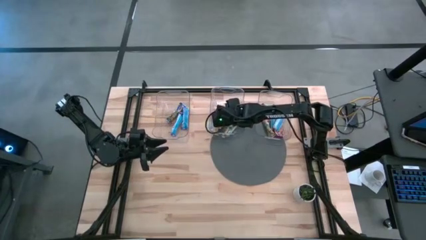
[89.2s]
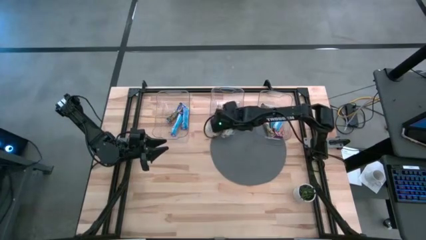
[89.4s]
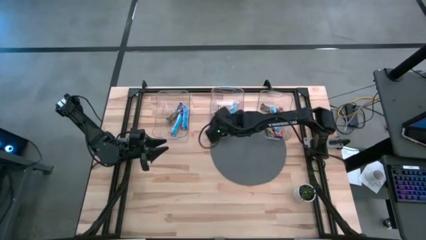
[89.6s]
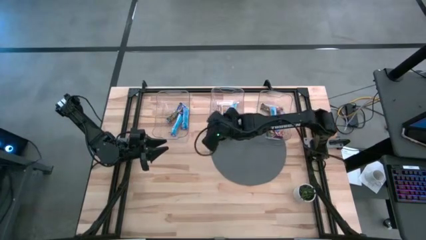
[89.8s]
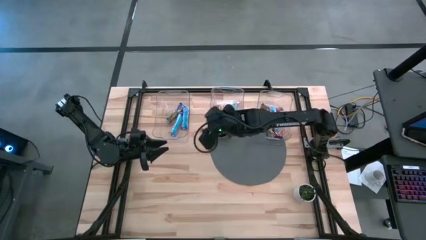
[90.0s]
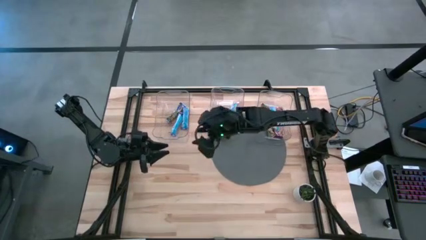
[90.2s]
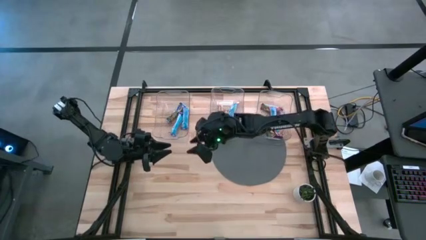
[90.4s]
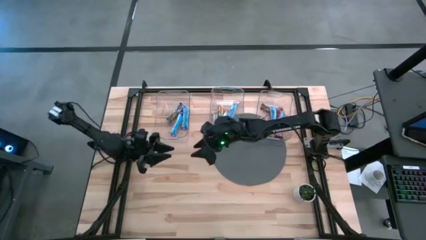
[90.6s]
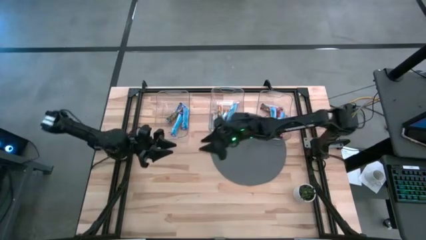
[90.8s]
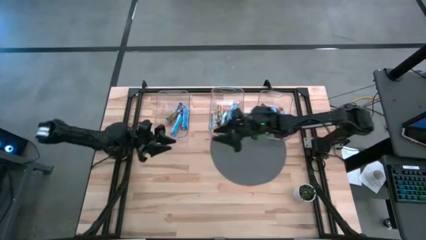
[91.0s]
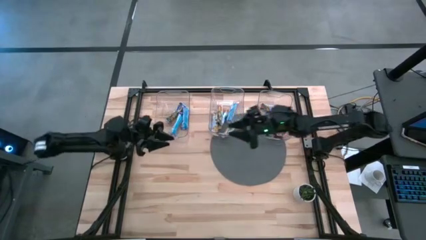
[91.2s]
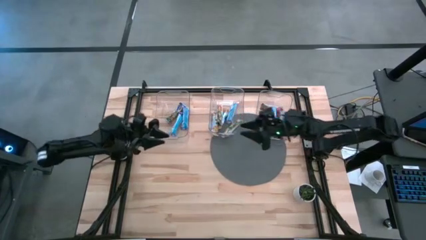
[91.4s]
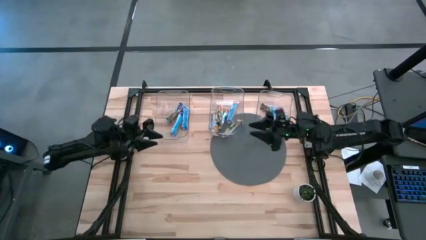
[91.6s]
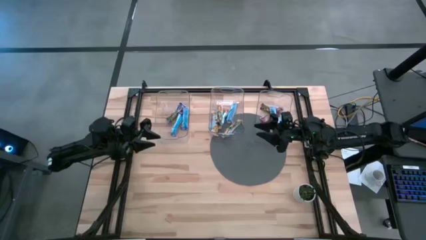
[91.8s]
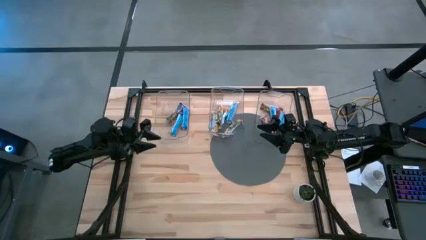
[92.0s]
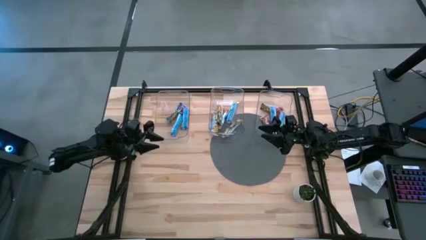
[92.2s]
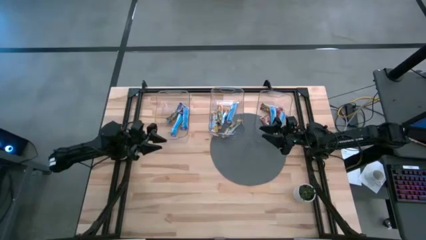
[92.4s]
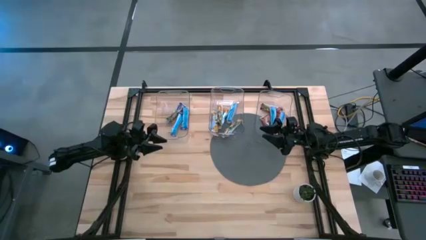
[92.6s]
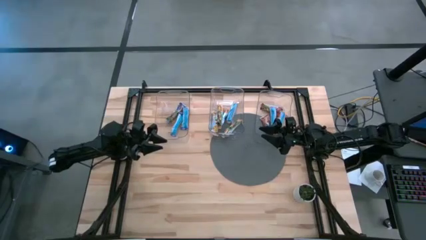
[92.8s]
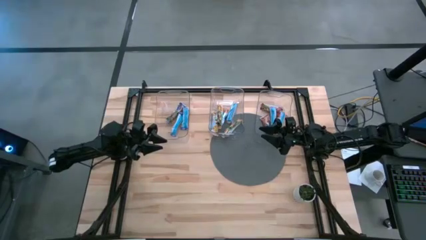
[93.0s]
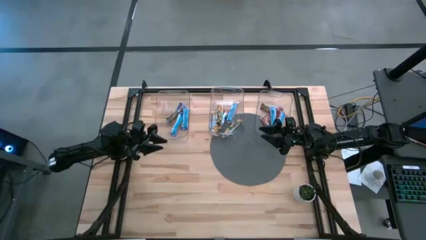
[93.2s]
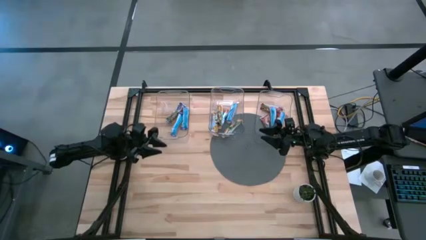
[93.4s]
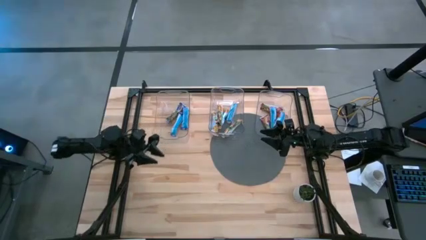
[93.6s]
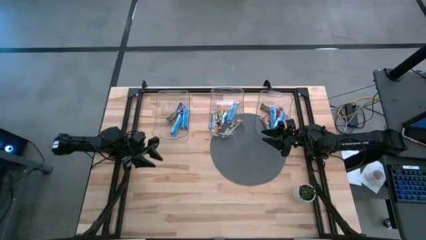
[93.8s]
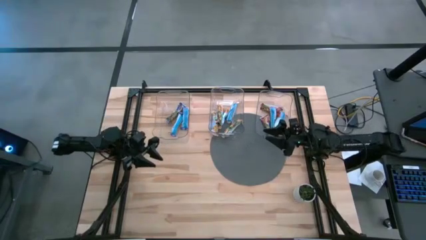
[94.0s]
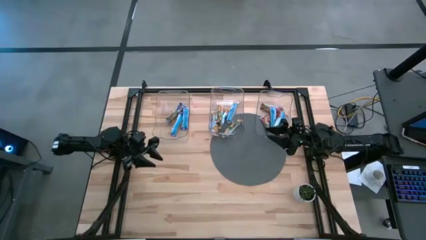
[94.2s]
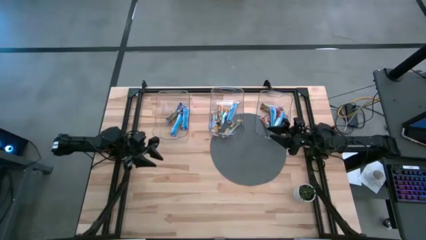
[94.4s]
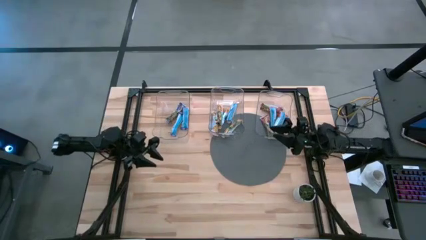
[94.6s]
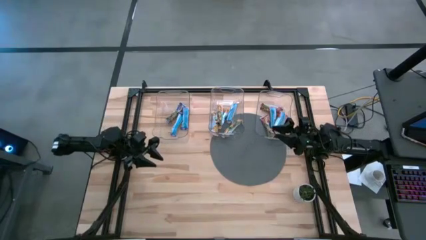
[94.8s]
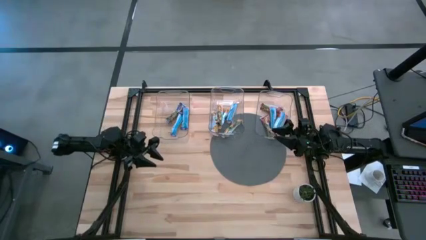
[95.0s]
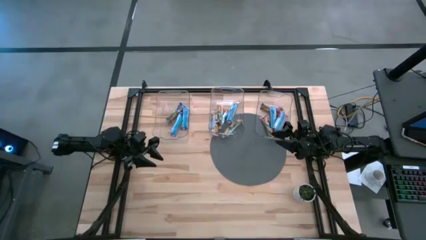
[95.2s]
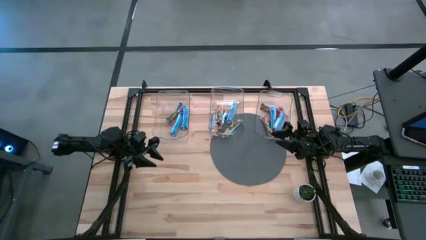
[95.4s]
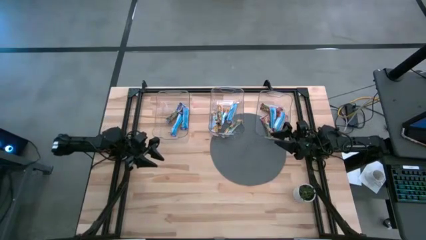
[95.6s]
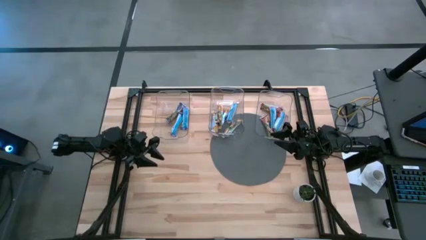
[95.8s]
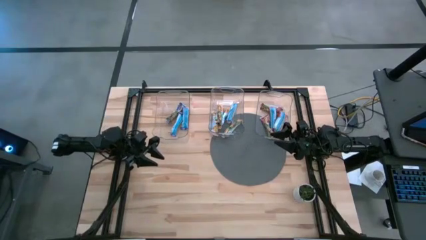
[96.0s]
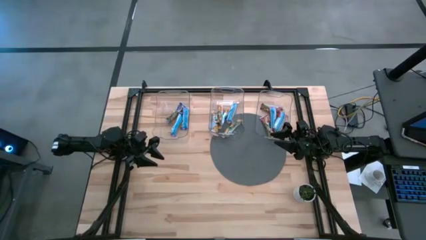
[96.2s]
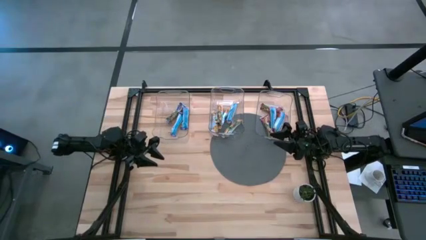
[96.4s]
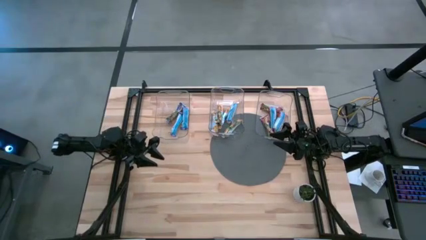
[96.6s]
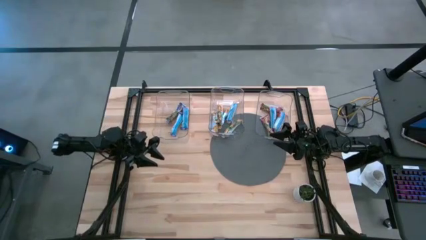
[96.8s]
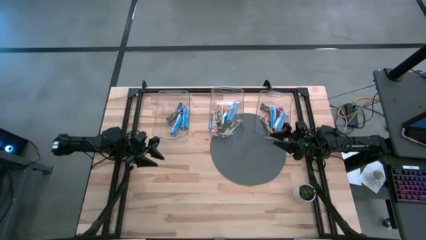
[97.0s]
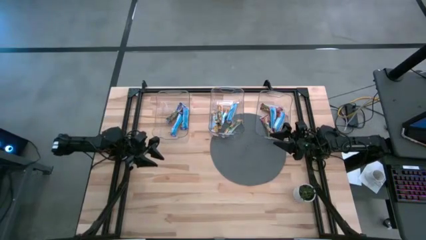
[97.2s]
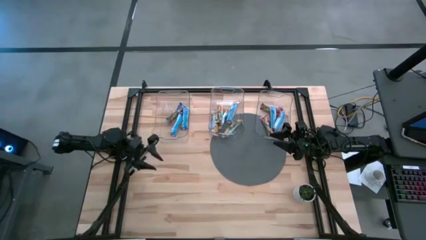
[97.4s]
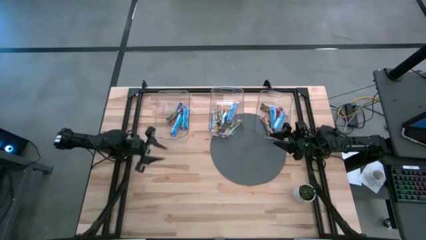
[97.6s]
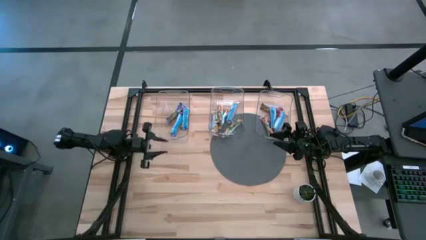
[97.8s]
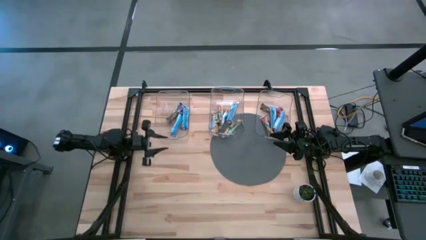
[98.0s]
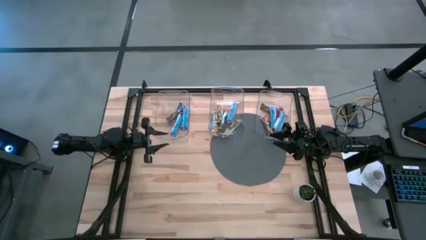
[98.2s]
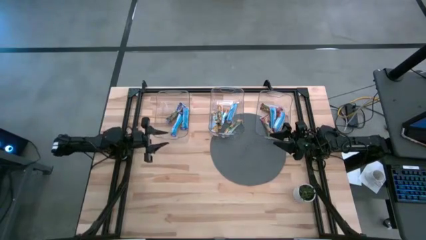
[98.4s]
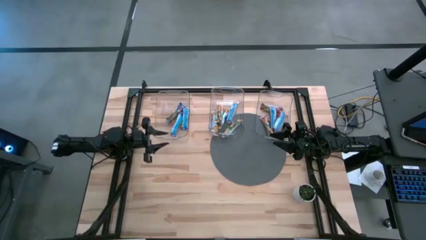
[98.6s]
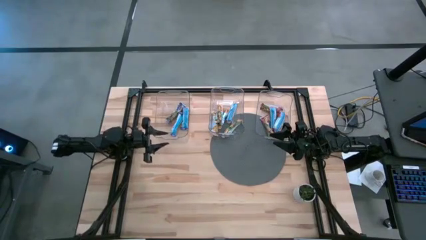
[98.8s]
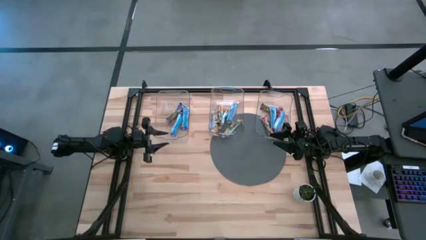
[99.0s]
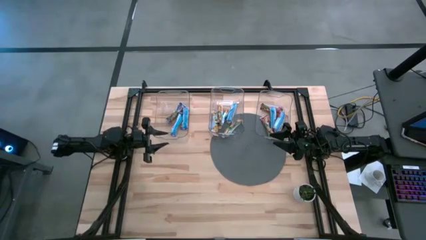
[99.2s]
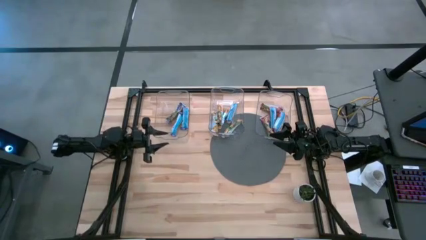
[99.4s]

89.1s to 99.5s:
Task: Pick and place Granola Bars by type
Return to Home Position

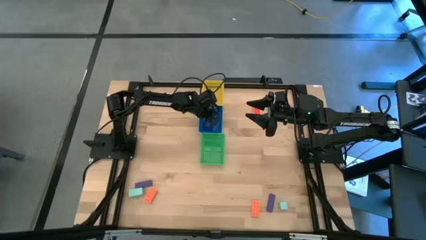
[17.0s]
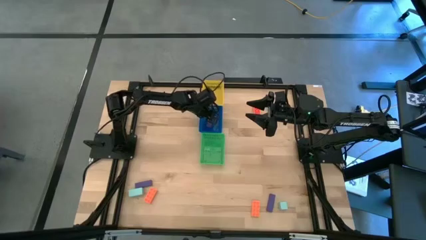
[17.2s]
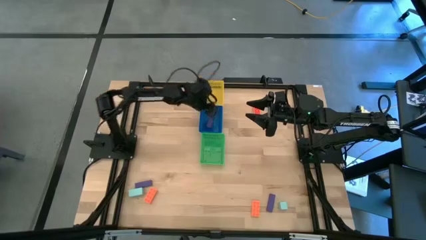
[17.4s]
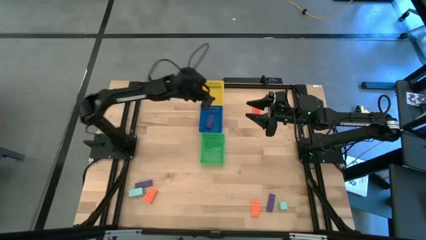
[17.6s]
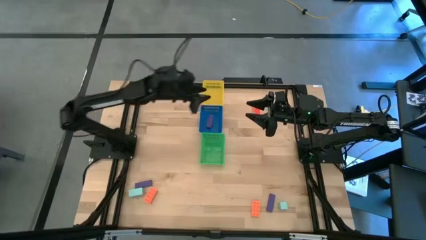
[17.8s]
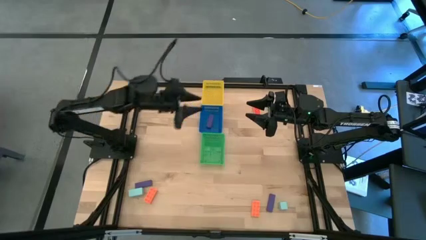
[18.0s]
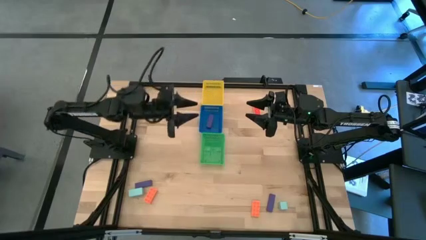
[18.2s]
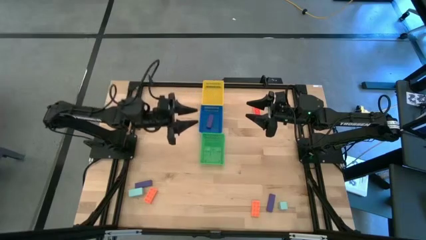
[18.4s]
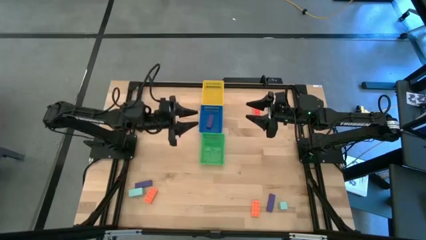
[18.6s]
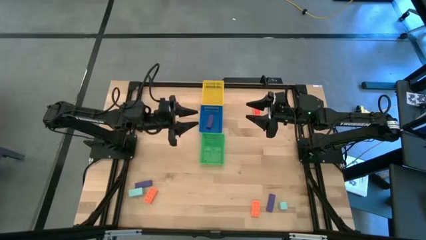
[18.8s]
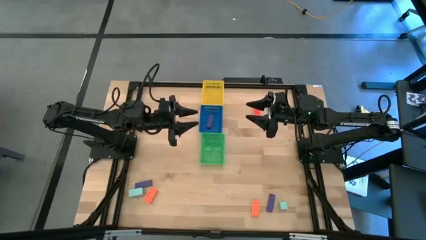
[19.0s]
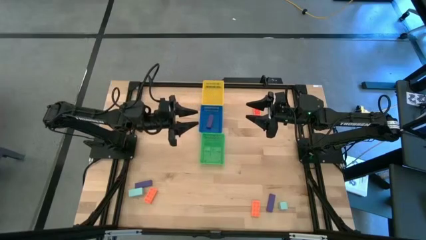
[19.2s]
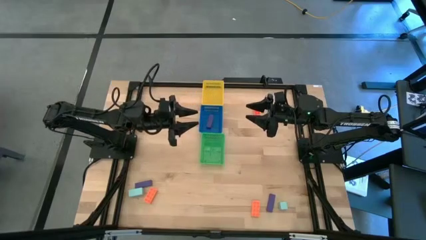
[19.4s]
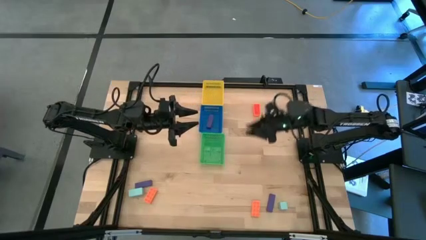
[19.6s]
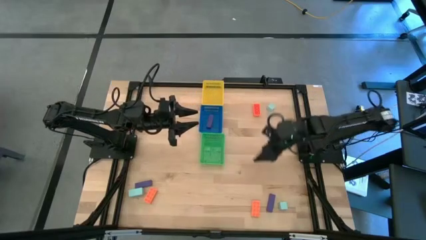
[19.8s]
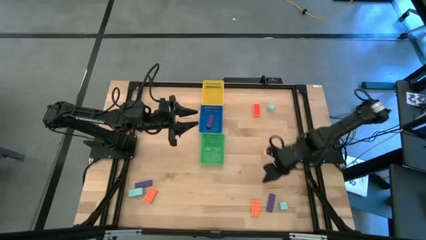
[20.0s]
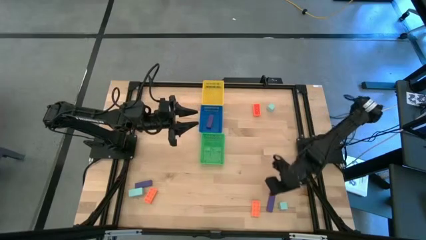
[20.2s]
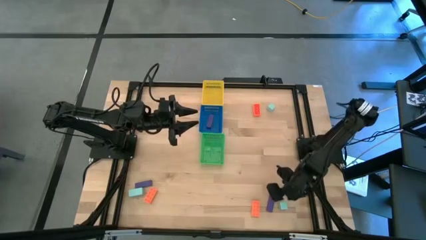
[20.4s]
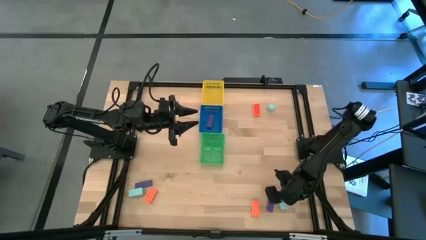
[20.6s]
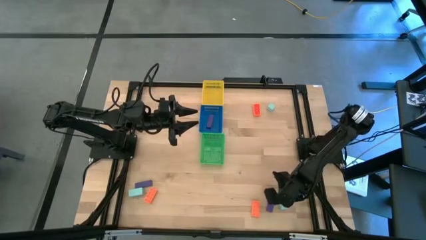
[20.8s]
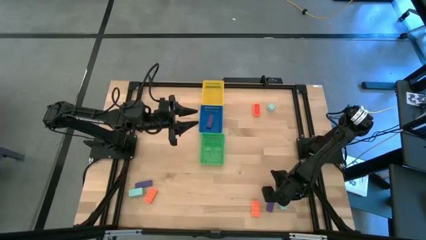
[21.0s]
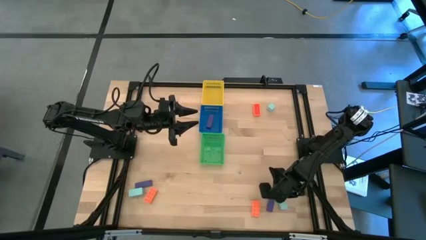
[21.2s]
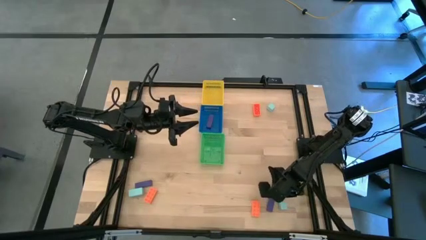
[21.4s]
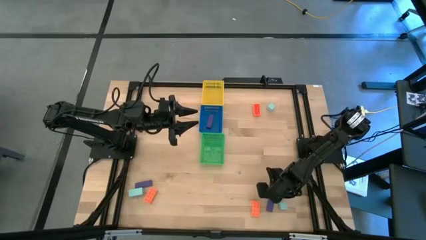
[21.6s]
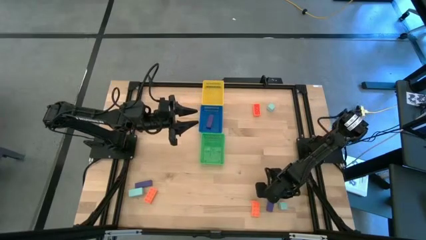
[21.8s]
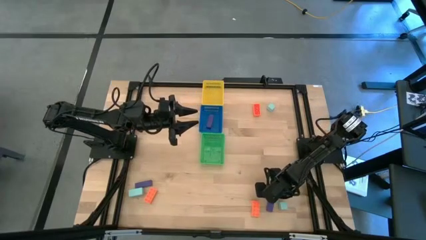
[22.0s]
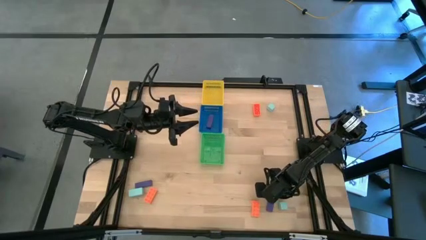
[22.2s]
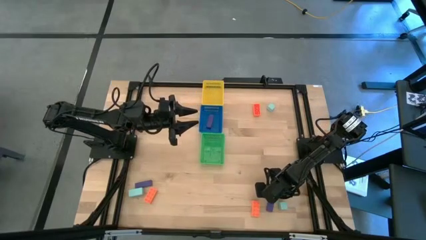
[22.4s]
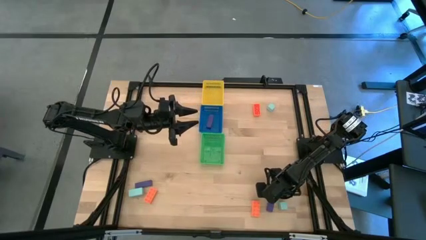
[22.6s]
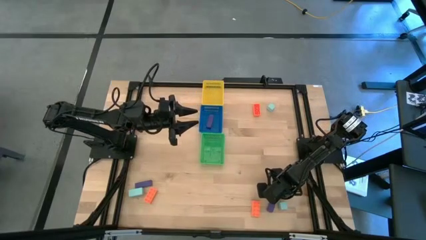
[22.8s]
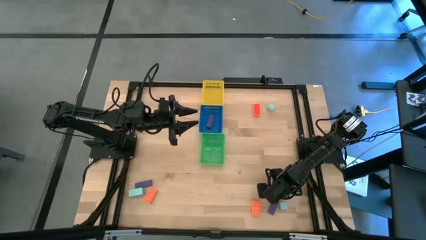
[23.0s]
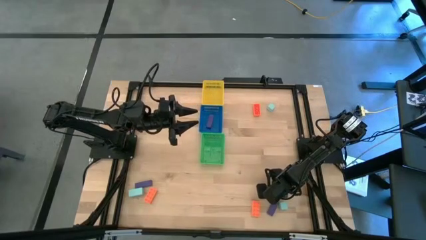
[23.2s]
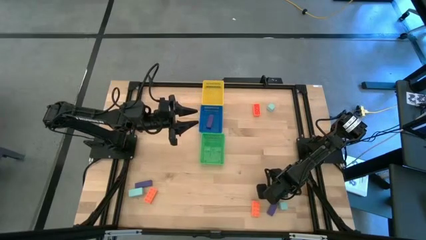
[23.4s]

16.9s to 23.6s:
Task: Sort & place blocks by color
Put the right violet block into the blue basket
